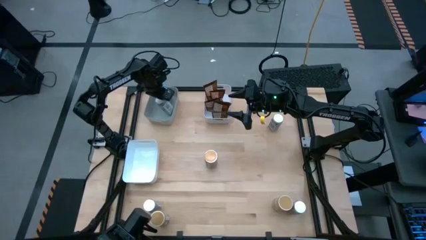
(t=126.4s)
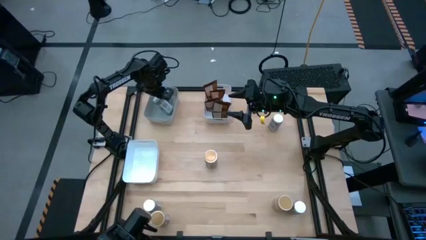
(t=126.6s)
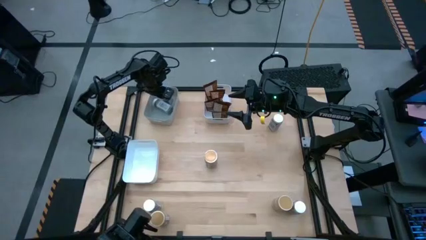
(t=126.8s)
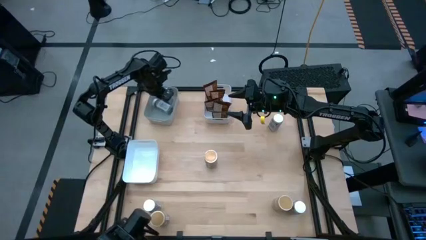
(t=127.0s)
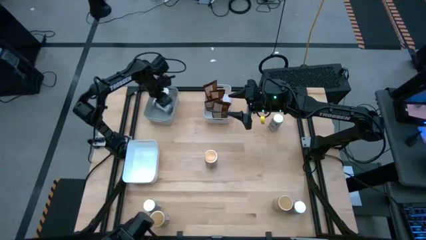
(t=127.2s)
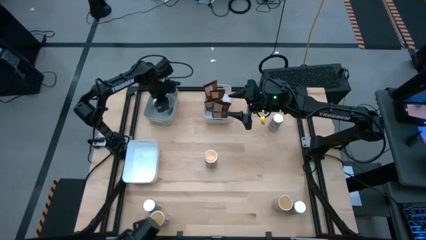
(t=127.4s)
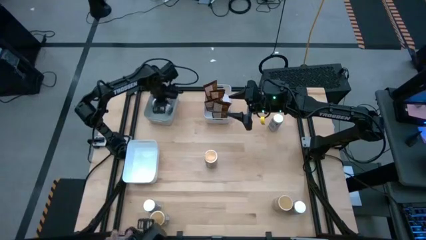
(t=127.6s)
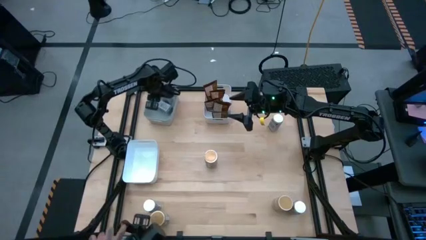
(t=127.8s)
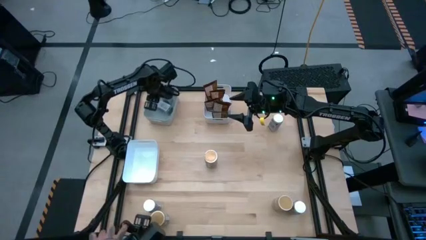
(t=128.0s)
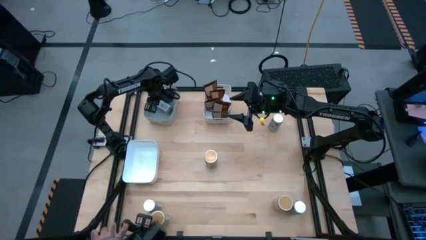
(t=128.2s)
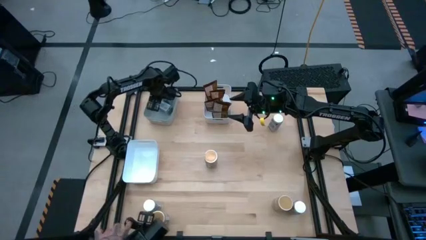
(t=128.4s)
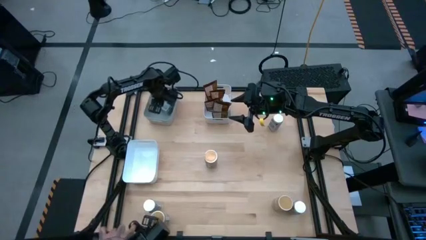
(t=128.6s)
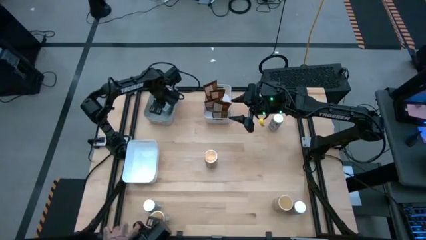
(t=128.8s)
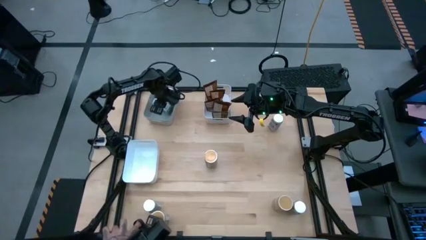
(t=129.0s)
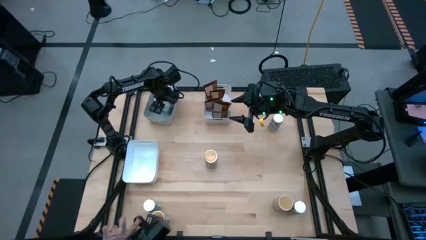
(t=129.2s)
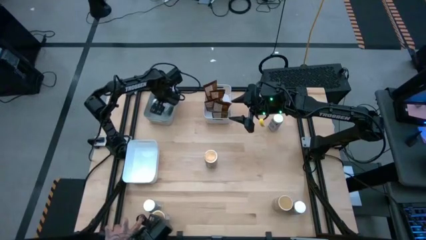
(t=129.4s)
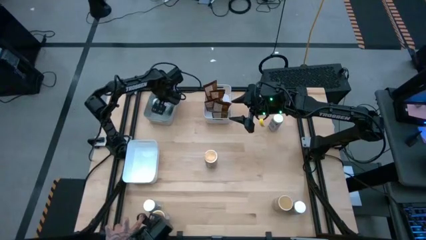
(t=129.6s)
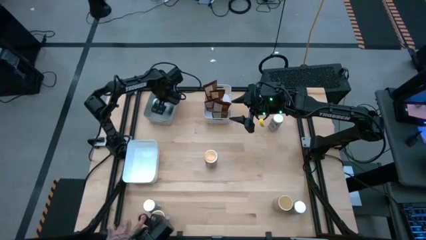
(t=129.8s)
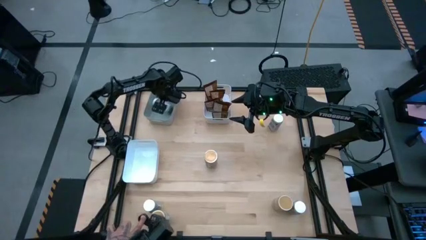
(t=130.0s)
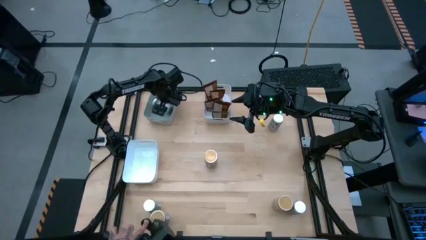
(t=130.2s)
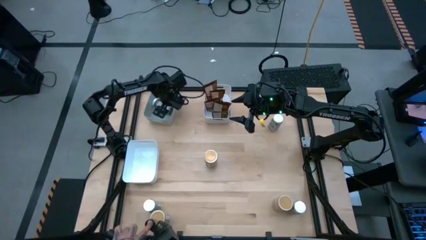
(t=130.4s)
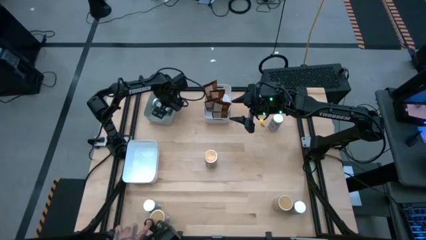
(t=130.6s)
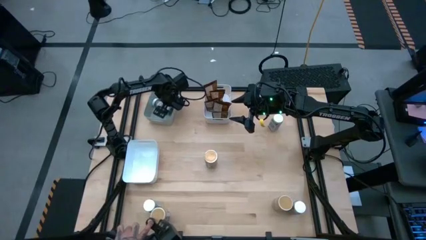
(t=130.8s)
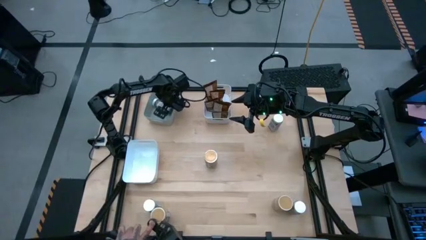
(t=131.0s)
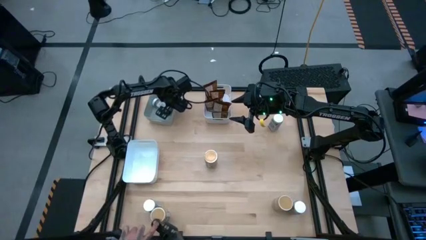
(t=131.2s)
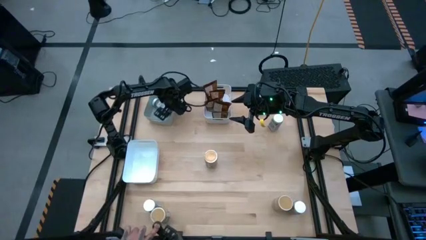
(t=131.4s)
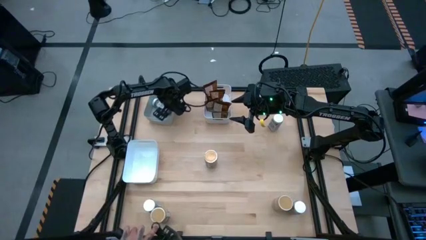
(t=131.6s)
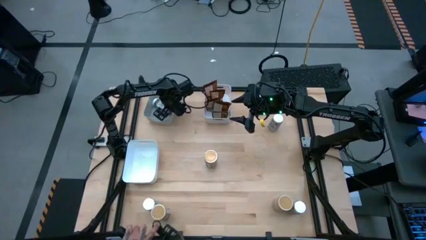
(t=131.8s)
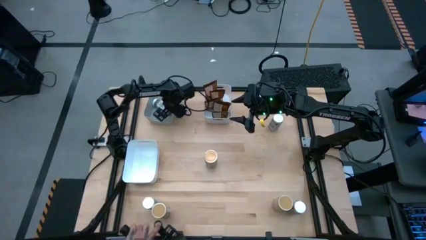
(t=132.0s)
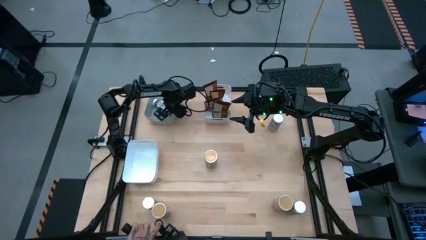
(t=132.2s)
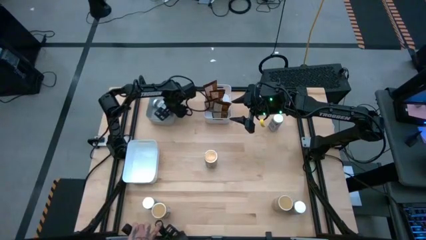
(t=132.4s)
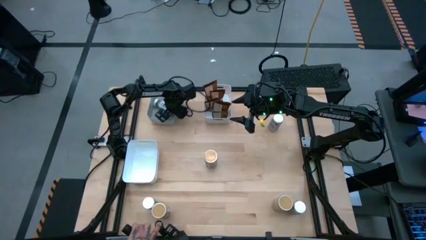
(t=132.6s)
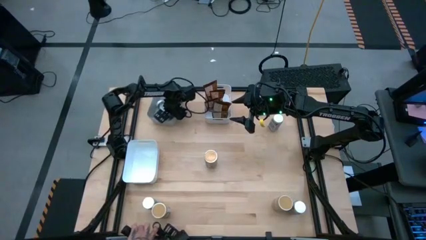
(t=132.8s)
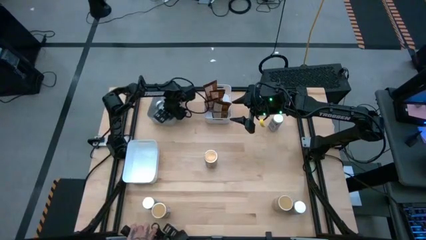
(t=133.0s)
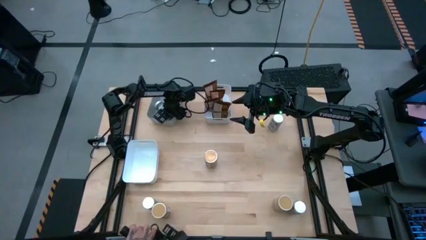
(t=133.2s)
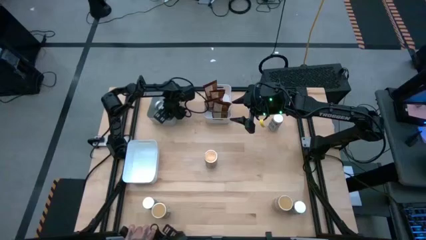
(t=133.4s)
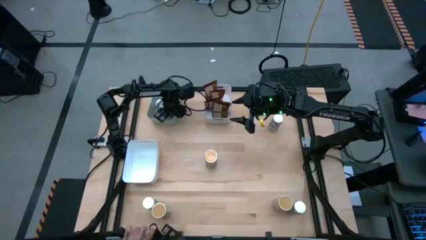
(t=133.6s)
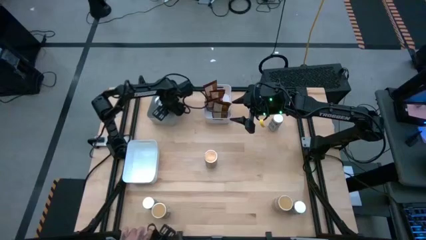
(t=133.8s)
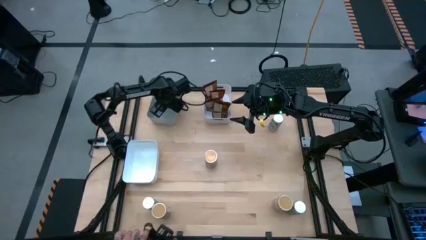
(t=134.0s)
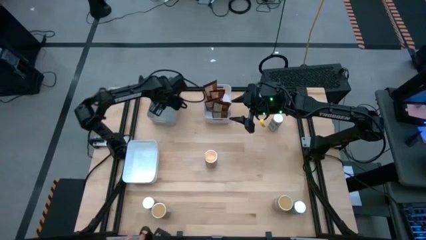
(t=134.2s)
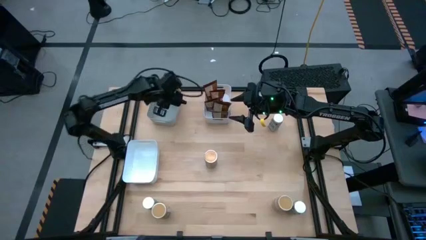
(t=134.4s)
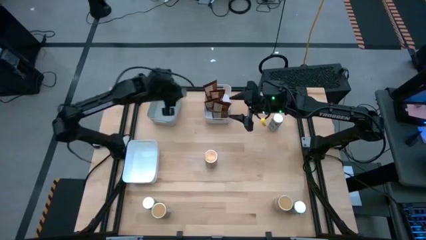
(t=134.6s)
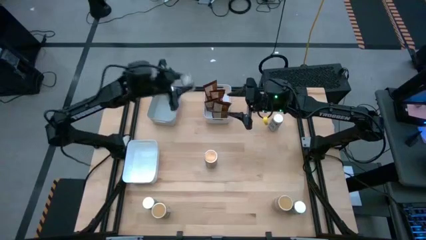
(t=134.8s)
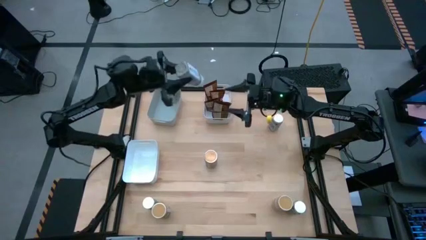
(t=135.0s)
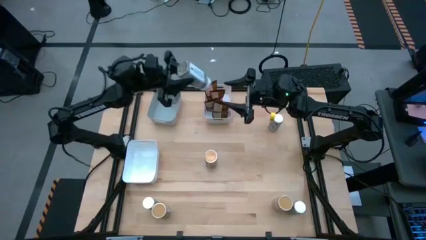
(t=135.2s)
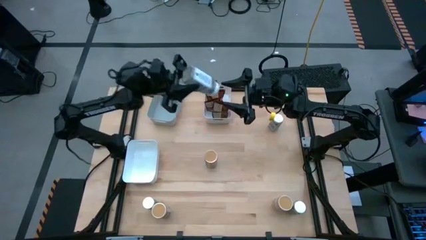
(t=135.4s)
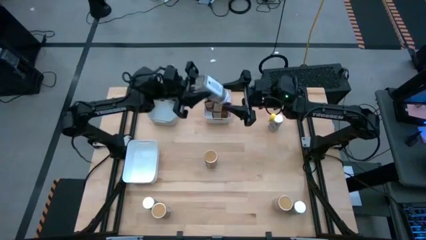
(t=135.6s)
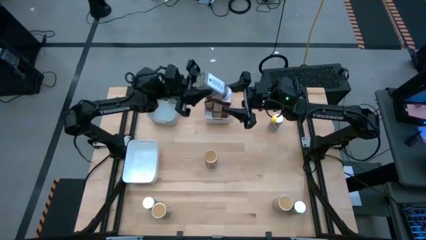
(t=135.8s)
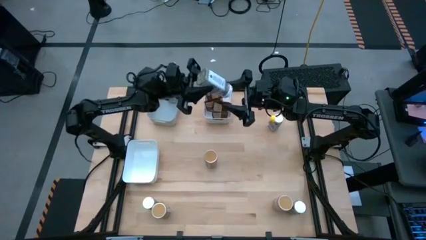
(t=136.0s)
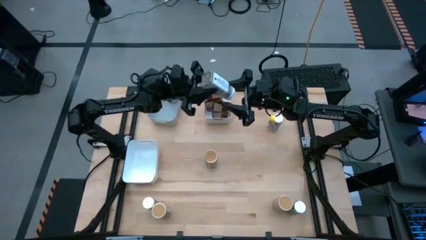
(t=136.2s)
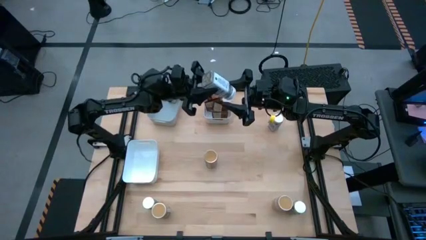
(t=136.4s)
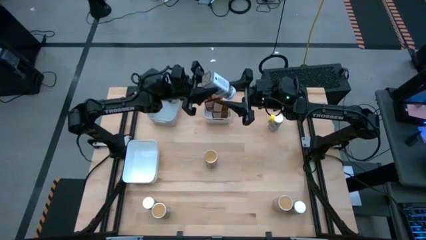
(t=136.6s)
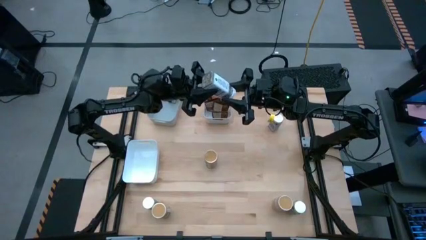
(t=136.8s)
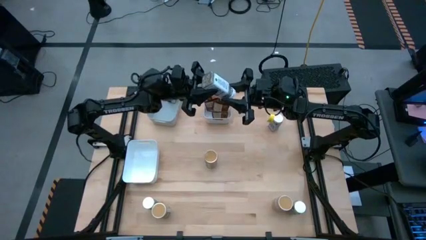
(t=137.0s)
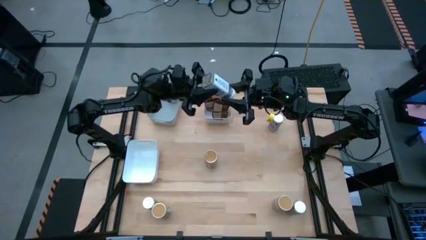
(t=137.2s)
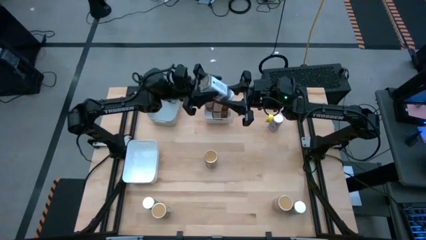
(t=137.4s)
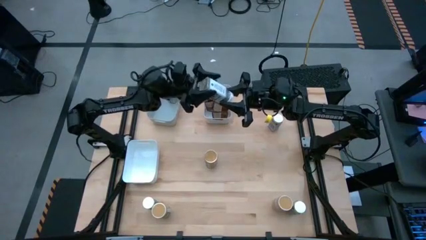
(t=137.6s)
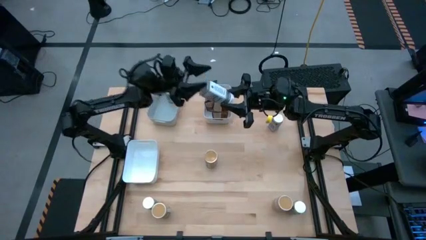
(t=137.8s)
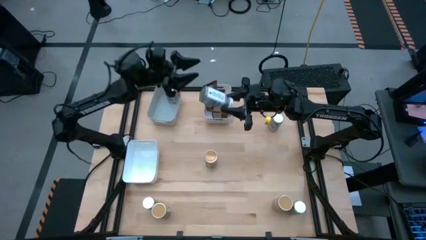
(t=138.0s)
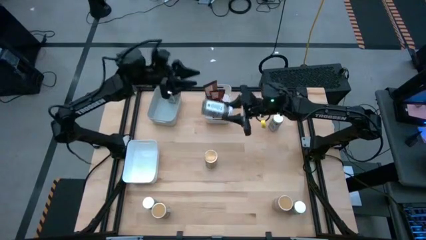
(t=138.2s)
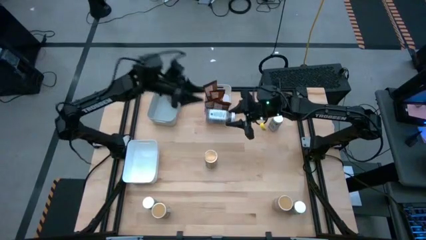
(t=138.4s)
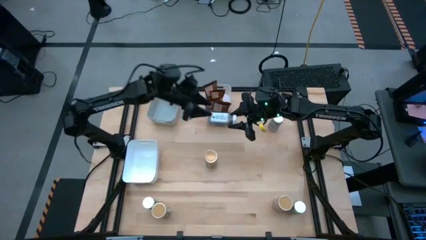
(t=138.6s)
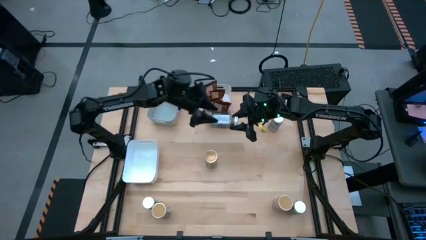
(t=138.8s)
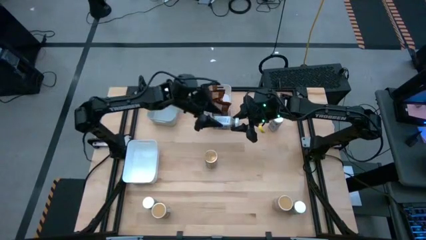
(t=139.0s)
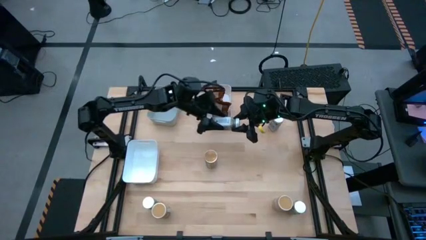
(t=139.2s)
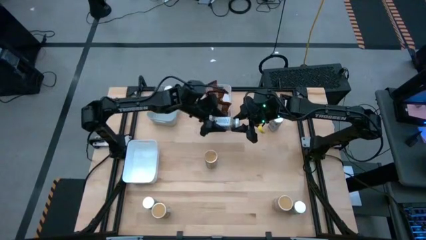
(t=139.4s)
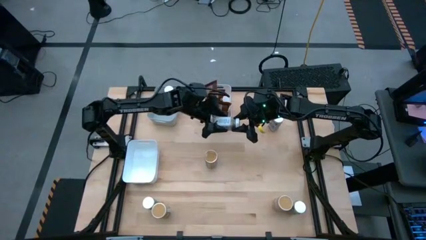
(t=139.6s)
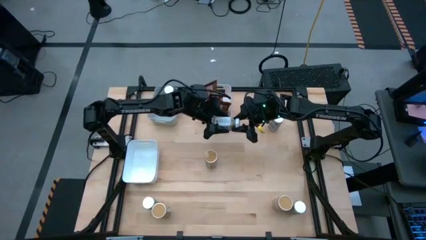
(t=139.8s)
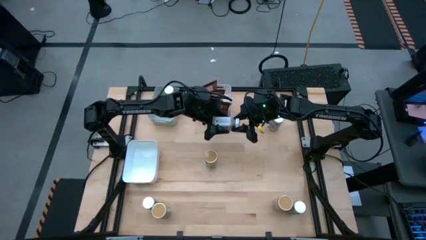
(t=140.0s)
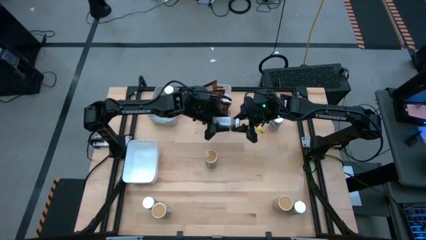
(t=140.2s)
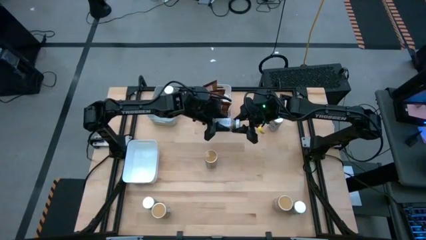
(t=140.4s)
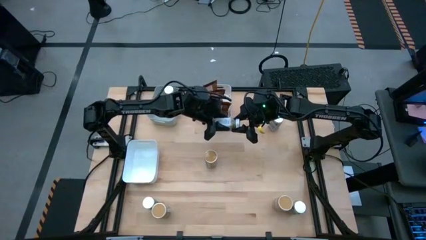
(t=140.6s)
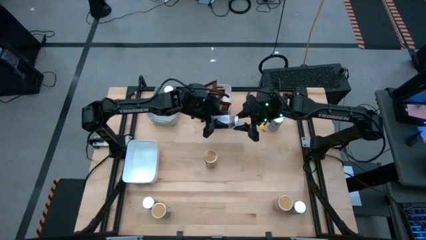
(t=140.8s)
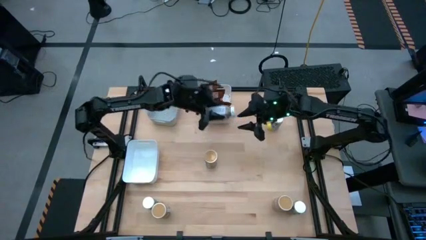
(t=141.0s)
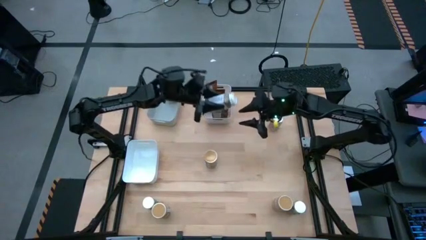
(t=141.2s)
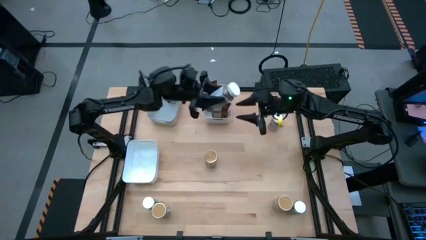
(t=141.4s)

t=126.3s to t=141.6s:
Task: Sort spices by type
Put the white seasoning bottle into the gray bin

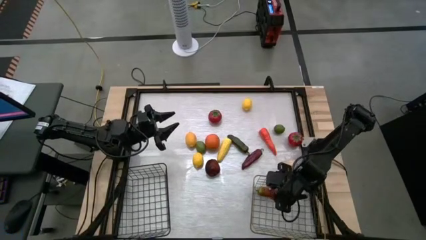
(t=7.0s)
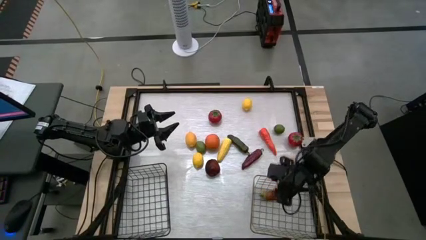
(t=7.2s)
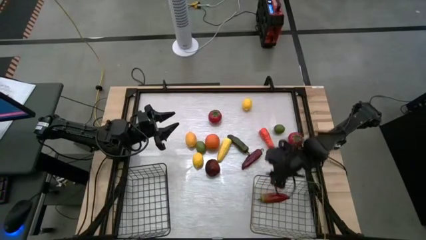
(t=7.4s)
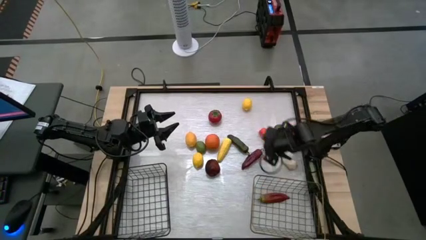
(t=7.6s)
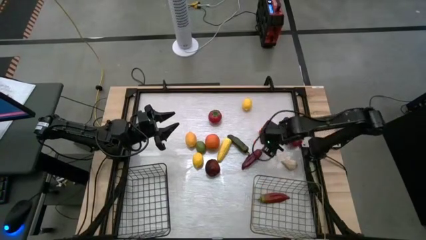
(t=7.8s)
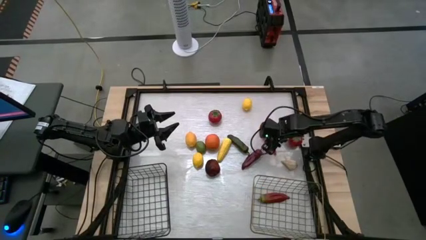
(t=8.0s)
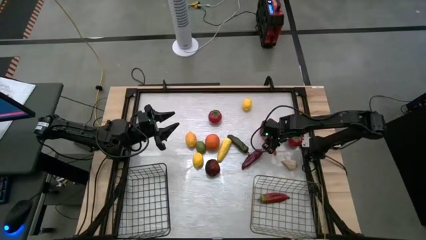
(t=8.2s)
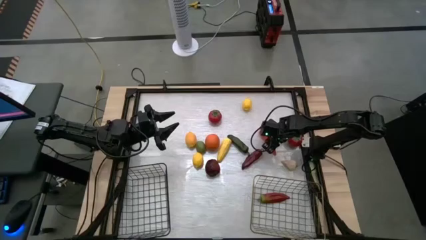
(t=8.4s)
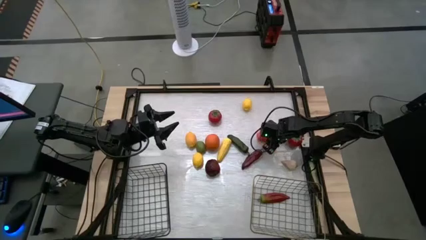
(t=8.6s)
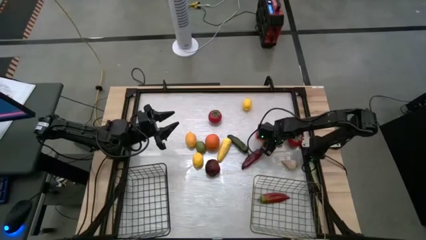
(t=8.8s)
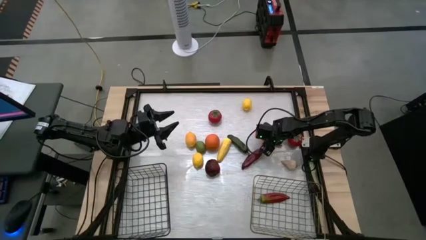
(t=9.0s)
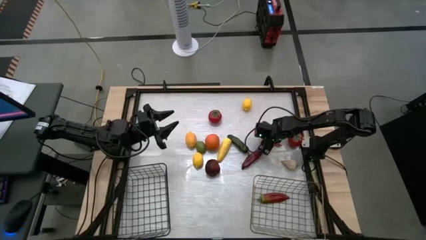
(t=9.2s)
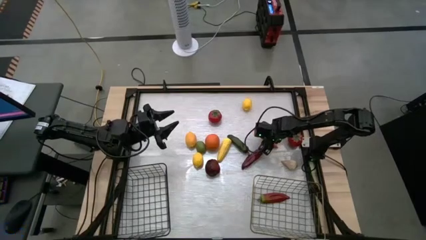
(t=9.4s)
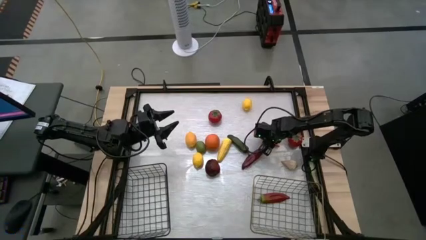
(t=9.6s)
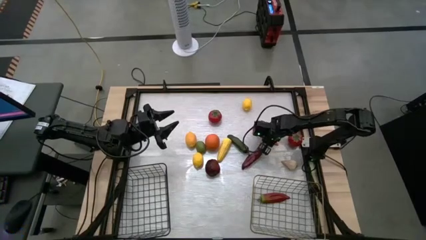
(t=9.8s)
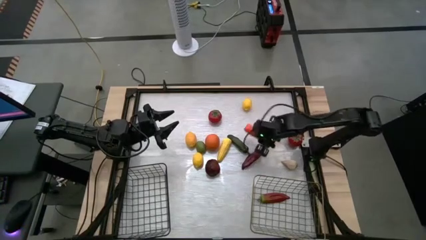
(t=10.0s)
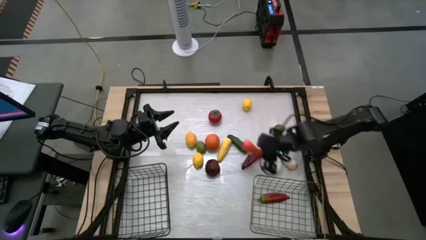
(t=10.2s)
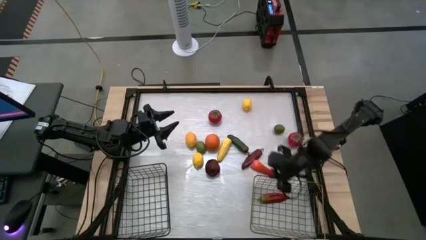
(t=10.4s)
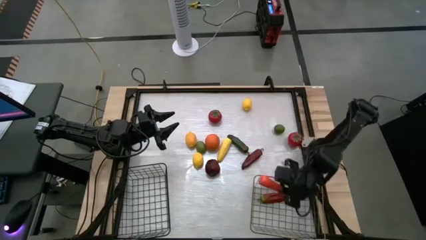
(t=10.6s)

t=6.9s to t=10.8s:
Task: Sort produce into baskets
Put the carrot into the gold wire basket
